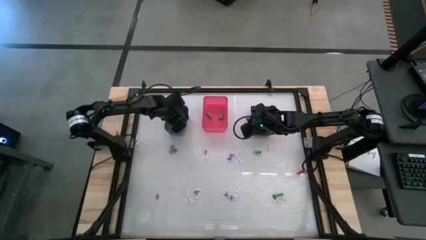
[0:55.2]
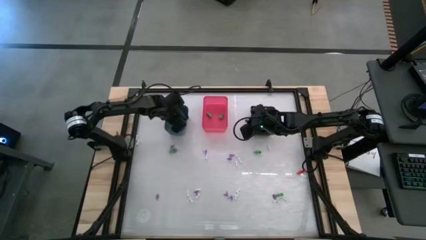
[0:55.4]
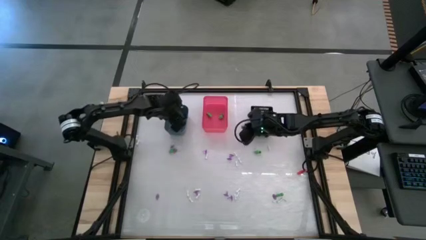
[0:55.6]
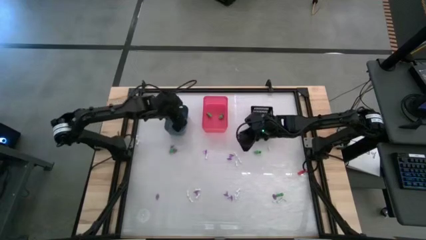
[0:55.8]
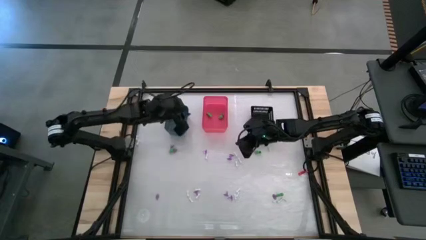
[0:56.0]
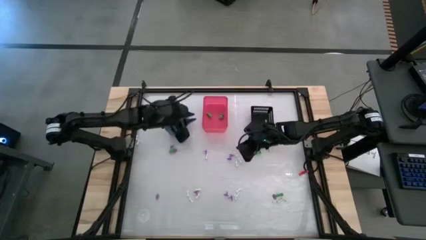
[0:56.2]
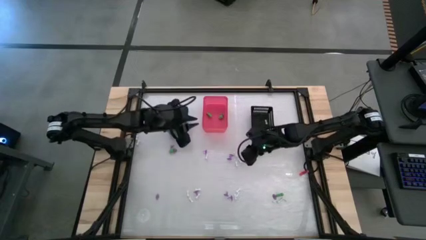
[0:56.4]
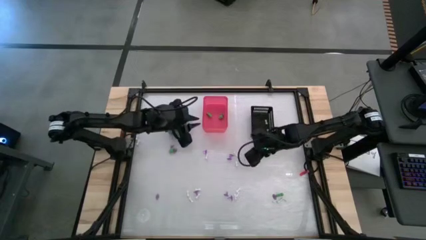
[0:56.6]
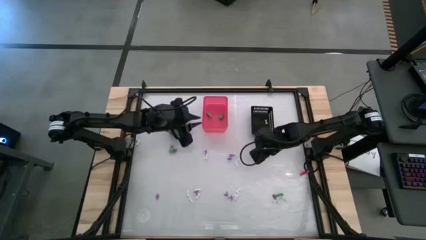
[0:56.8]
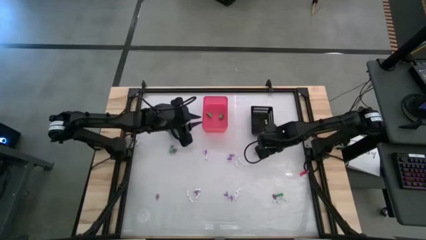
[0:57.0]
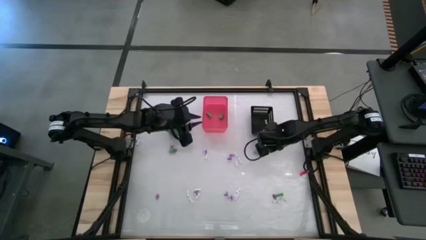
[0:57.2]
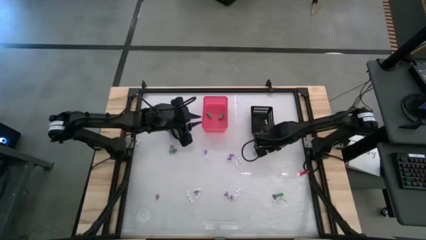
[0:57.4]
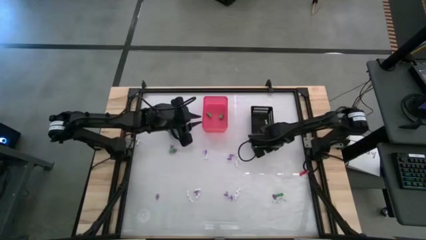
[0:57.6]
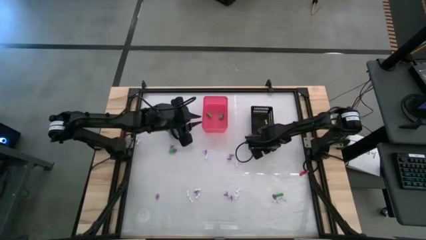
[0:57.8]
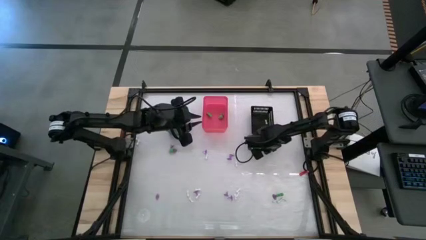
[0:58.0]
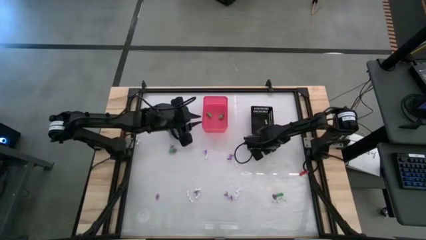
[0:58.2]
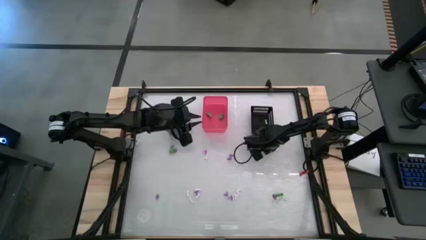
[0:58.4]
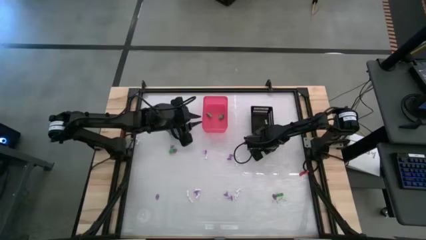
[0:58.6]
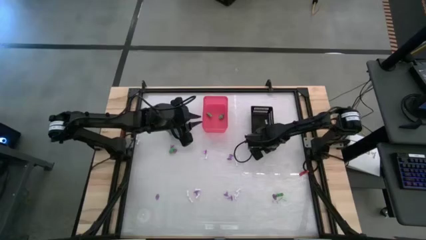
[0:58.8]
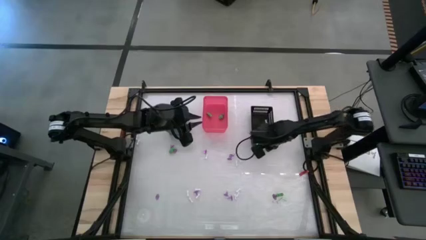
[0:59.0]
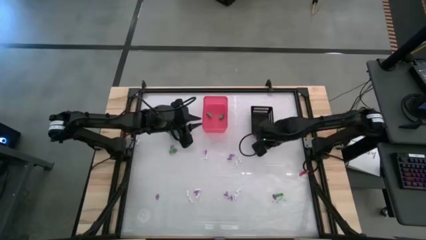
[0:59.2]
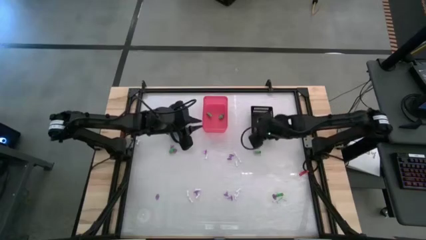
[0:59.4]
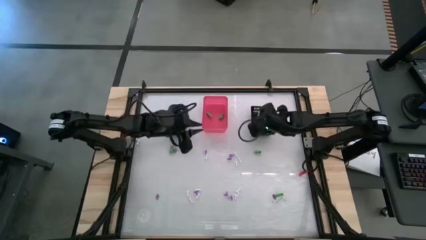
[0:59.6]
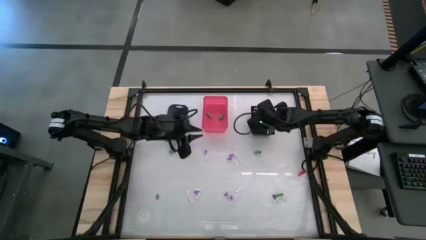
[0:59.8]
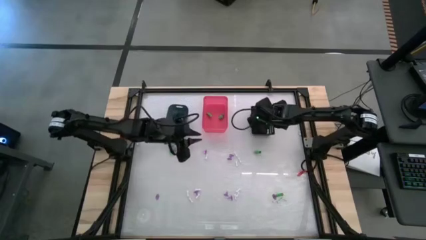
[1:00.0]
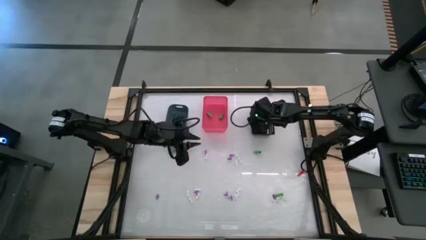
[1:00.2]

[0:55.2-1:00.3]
Task: Sort Halloween decoration
Put the white bone toy into the black bin

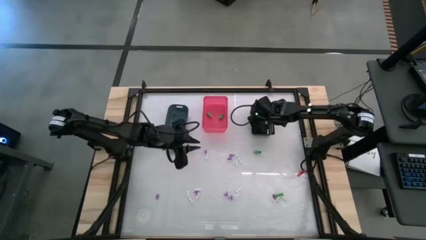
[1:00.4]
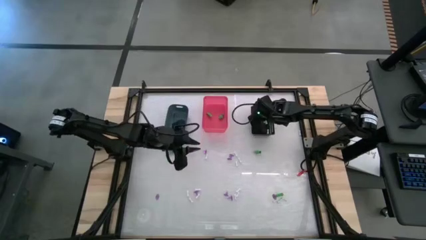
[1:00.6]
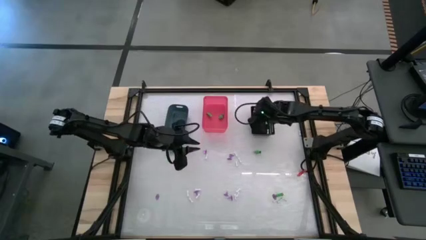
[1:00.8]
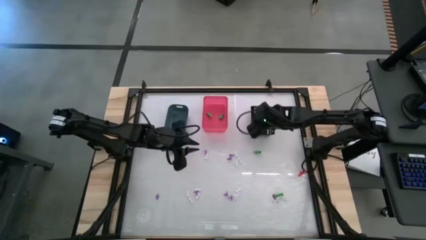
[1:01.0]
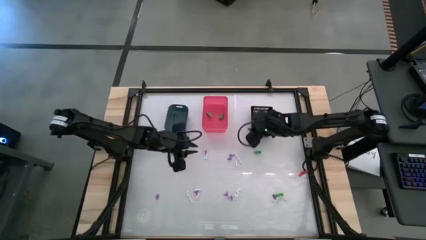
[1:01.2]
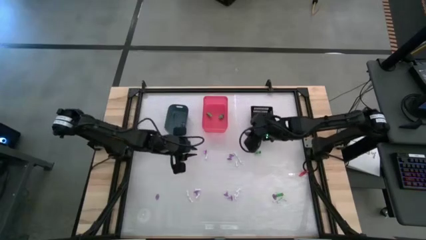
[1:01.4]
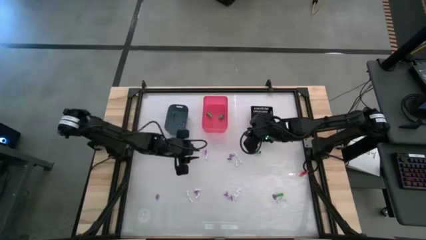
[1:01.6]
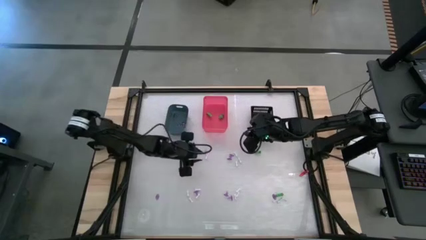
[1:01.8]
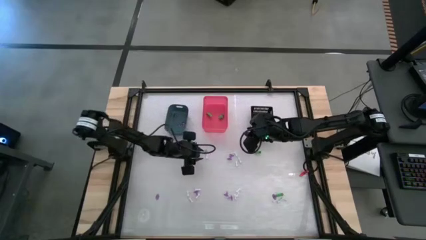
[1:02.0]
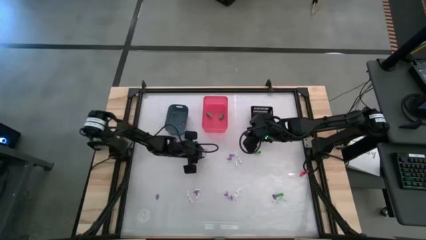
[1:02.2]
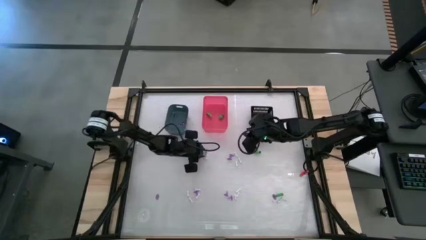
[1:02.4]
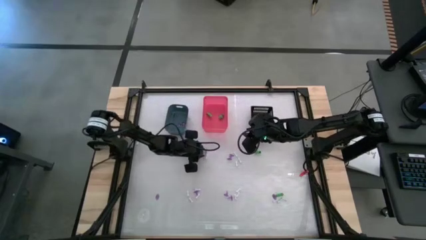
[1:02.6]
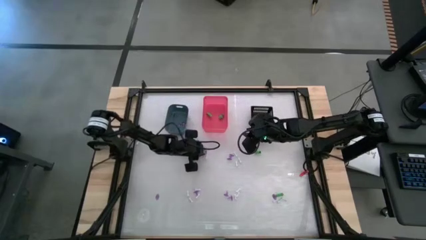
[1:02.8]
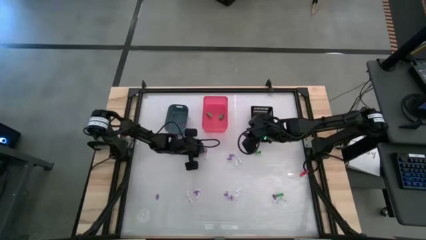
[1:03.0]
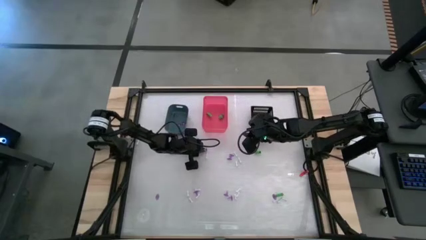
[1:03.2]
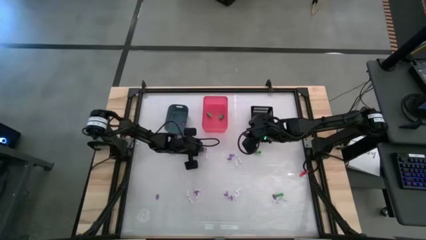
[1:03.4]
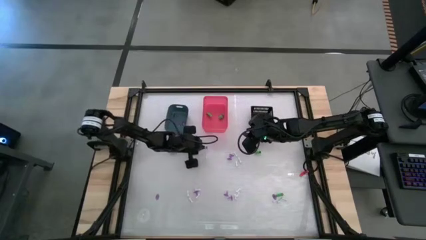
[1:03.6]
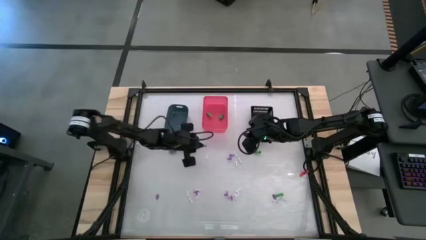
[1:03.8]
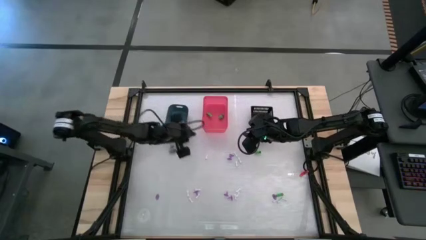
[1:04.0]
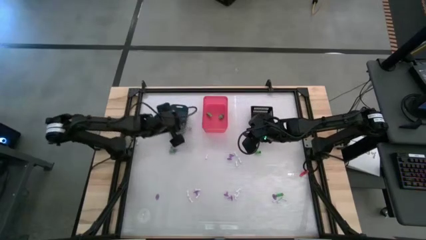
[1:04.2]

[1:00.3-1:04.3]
Put the purple witch hat toy into the blue bin

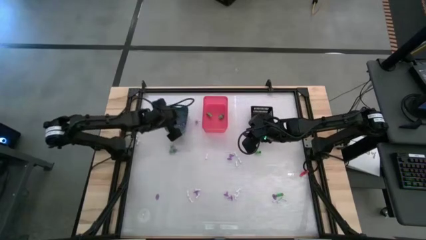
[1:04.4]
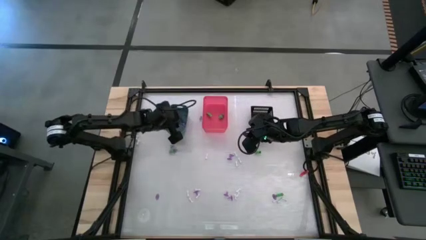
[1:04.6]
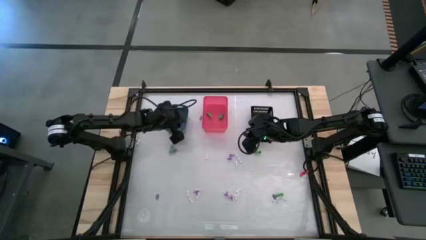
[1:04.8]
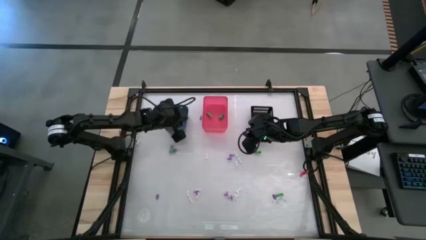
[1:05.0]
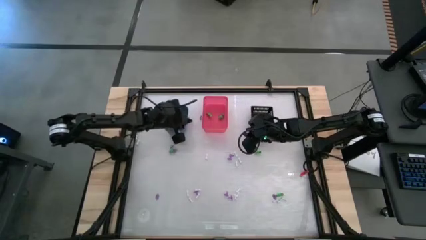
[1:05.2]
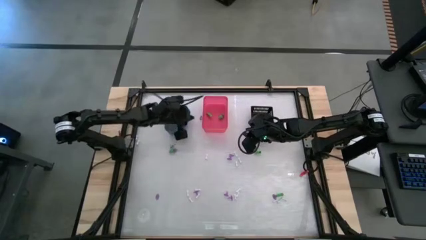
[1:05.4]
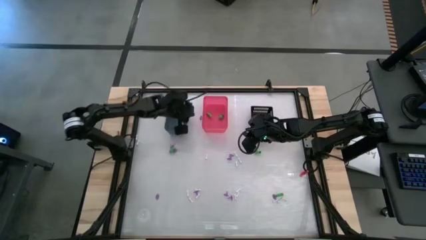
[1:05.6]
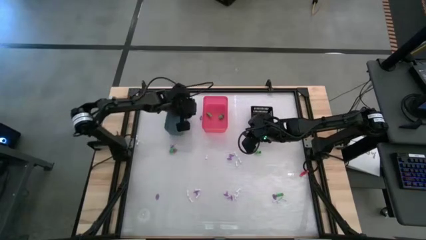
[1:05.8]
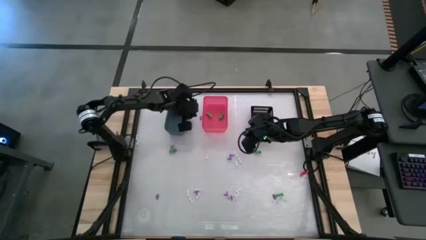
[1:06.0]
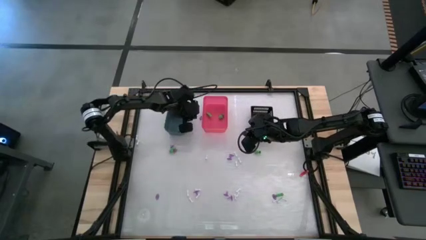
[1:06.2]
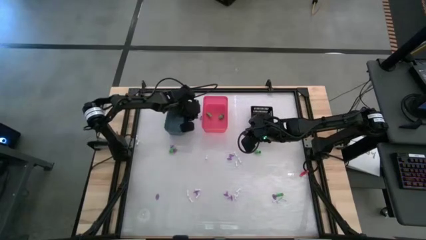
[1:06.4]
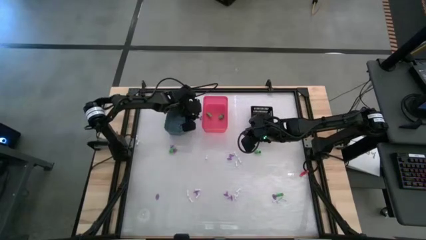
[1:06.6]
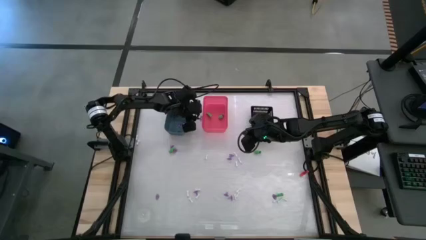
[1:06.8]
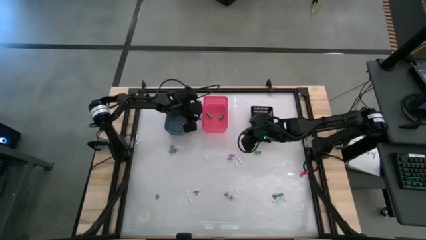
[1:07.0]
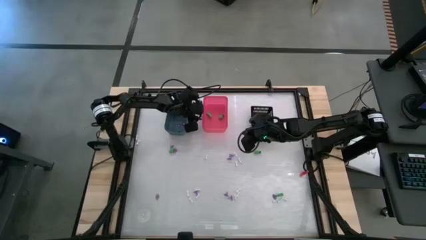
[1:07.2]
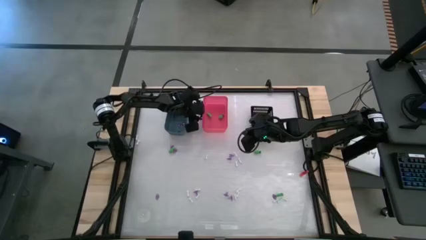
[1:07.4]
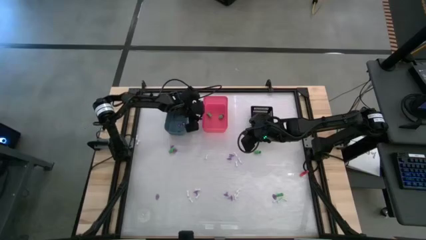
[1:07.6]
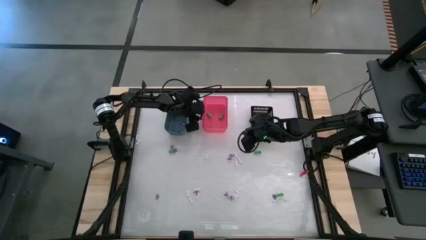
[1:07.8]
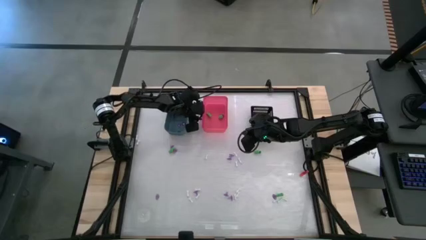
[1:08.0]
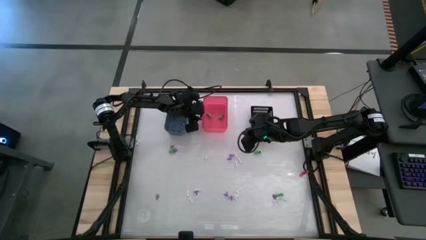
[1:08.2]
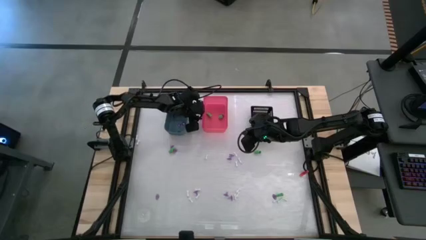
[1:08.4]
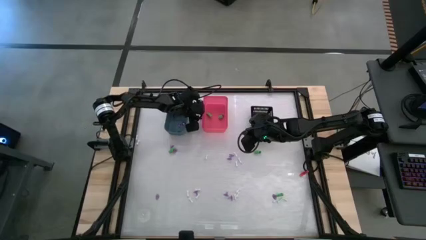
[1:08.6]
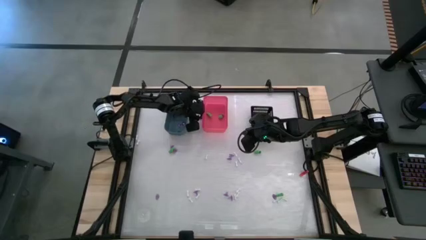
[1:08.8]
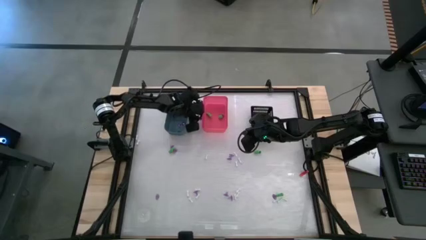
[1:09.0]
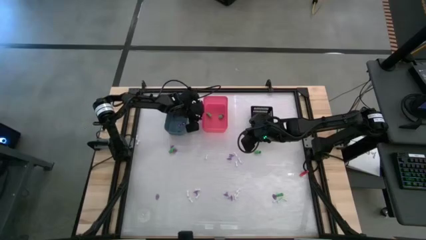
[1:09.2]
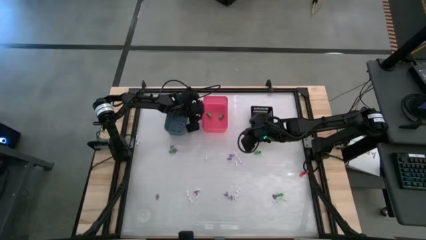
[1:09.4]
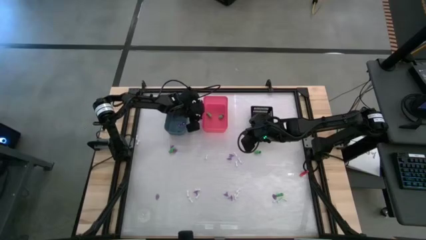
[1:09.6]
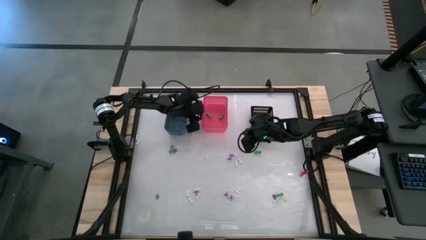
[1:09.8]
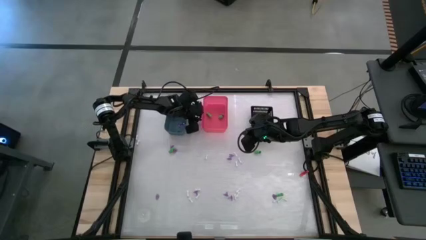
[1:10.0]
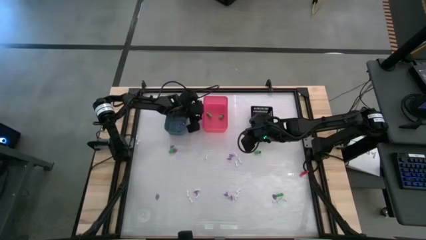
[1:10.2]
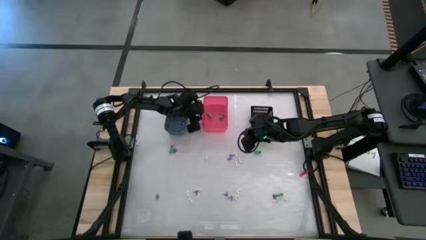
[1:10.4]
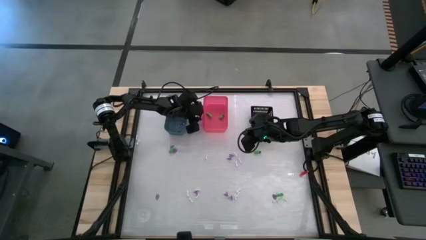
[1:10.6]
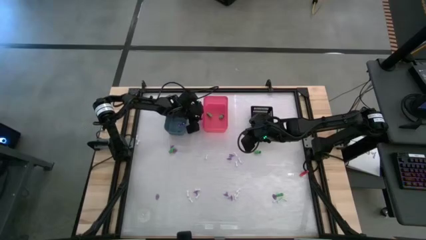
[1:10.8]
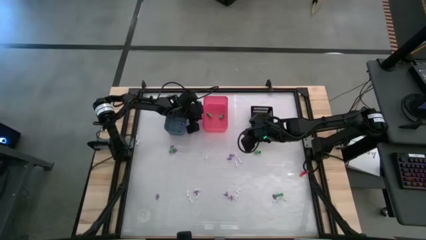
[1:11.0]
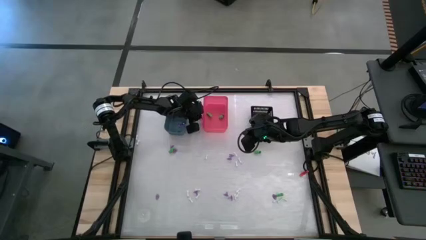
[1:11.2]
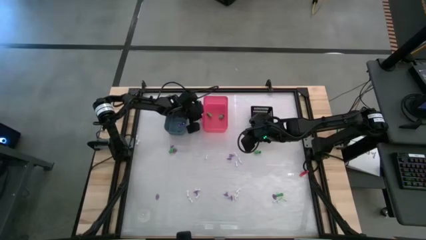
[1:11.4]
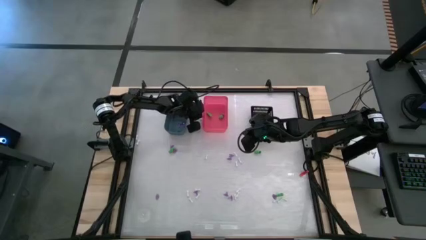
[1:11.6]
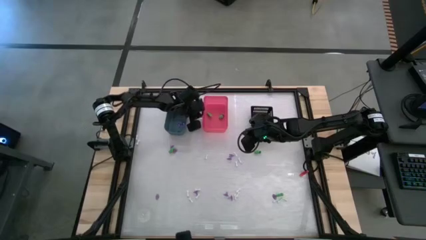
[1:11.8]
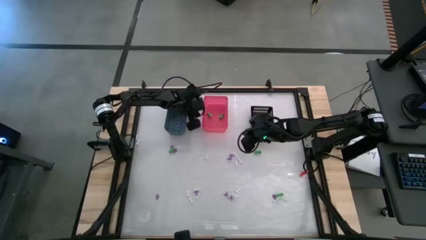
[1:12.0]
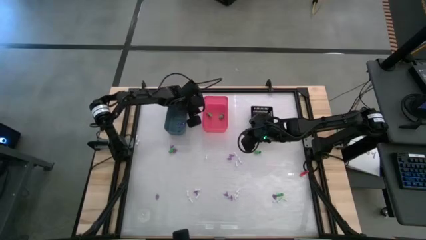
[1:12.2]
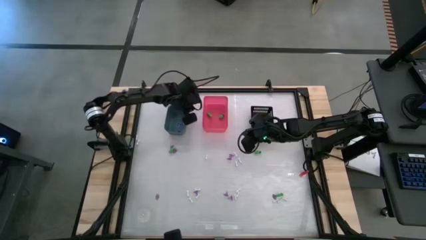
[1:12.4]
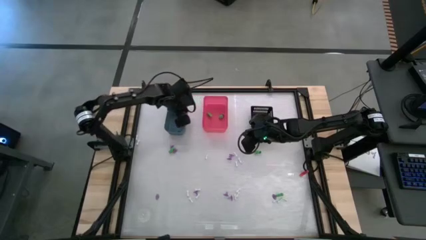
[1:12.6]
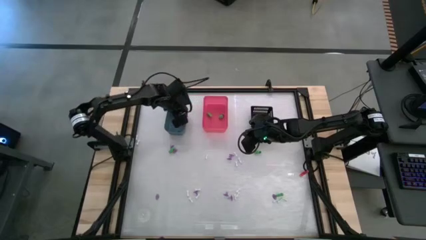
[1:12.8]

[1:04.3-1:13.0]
Put the purple witch hat toy into the blue bin
